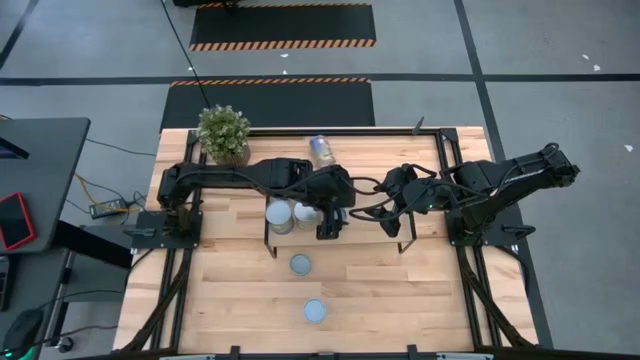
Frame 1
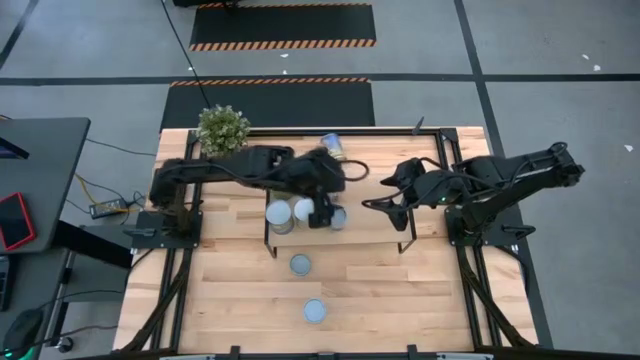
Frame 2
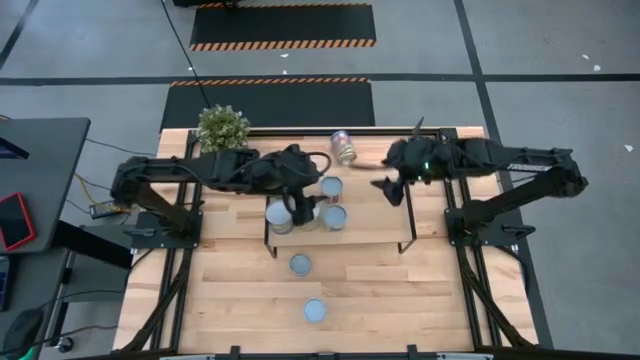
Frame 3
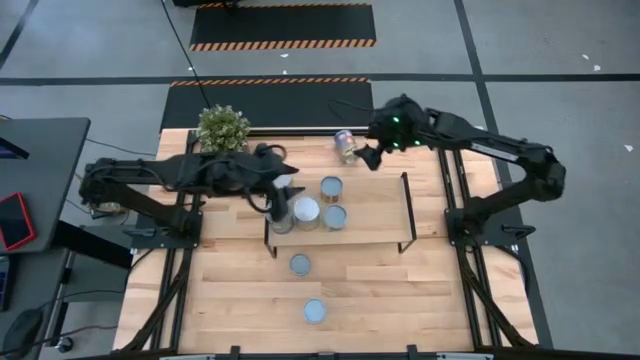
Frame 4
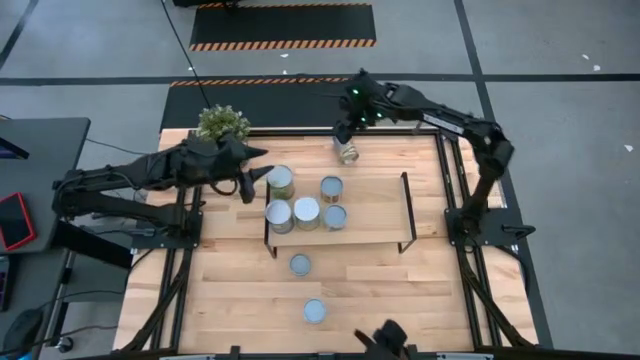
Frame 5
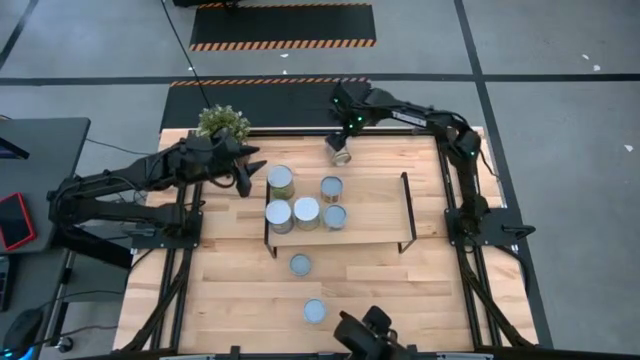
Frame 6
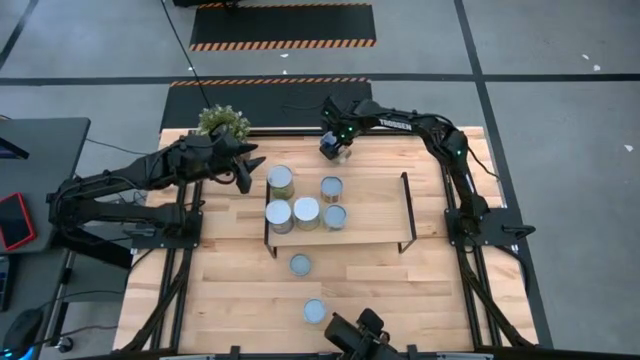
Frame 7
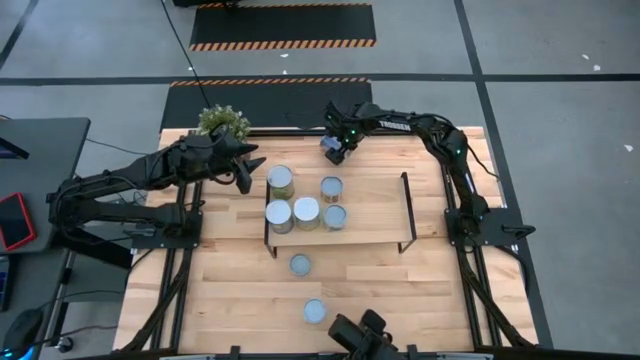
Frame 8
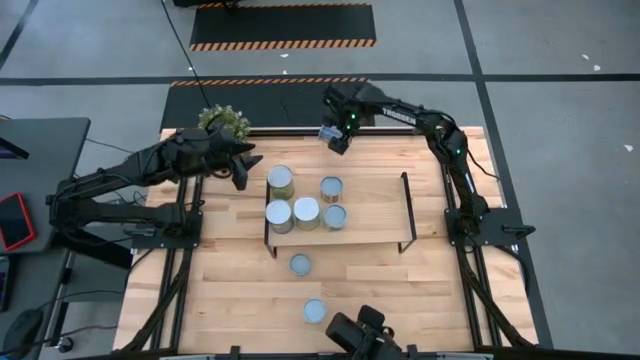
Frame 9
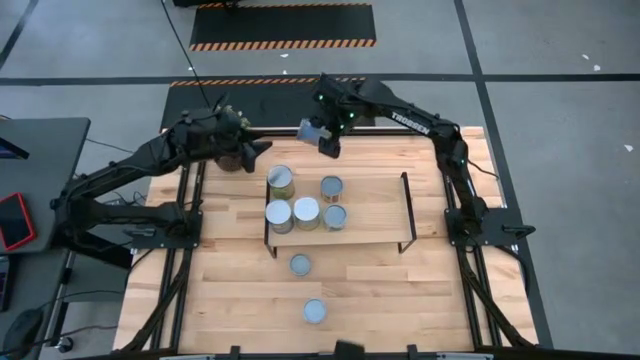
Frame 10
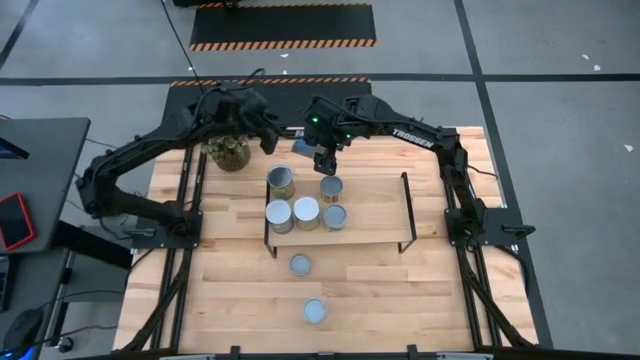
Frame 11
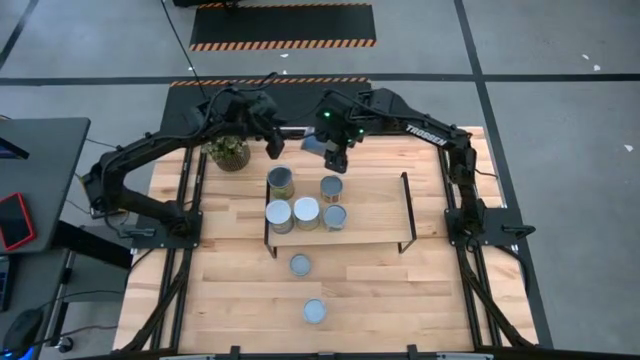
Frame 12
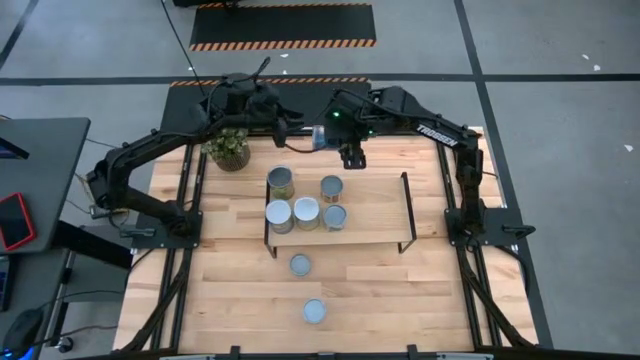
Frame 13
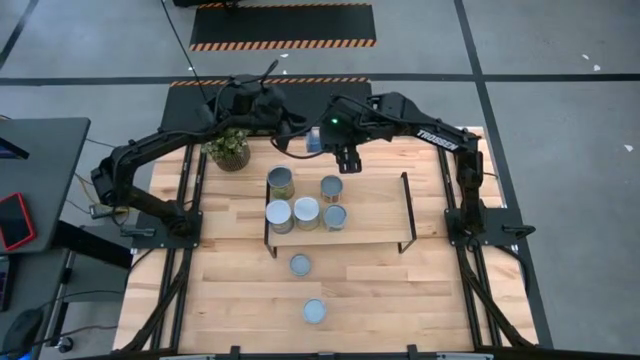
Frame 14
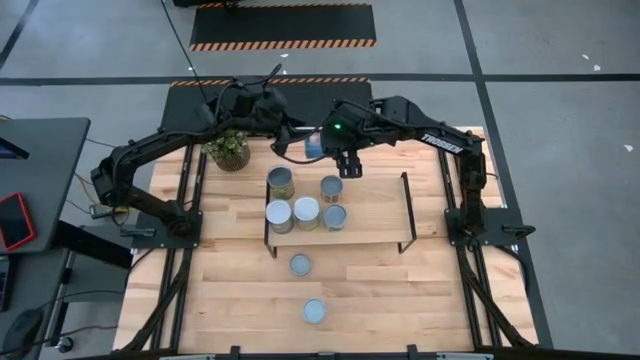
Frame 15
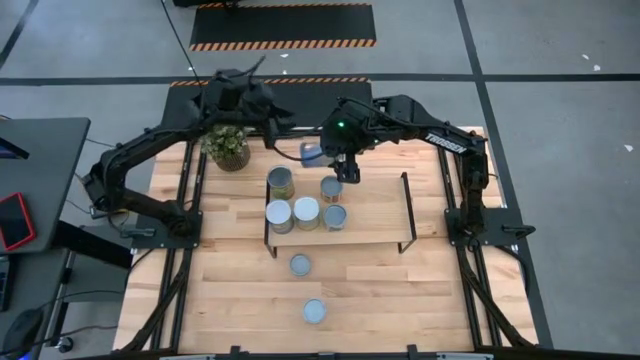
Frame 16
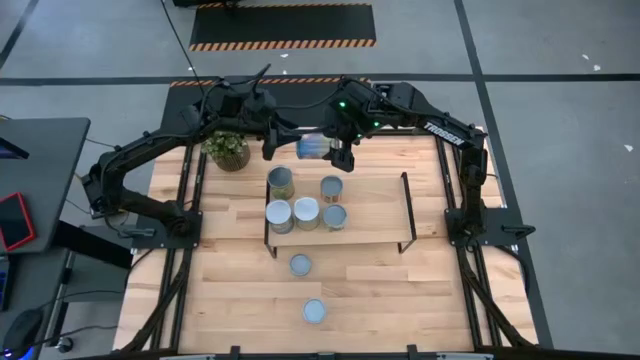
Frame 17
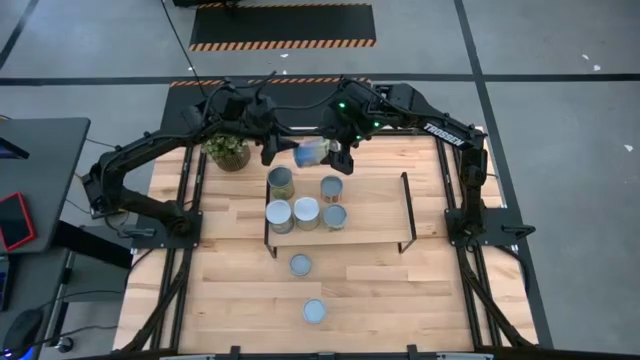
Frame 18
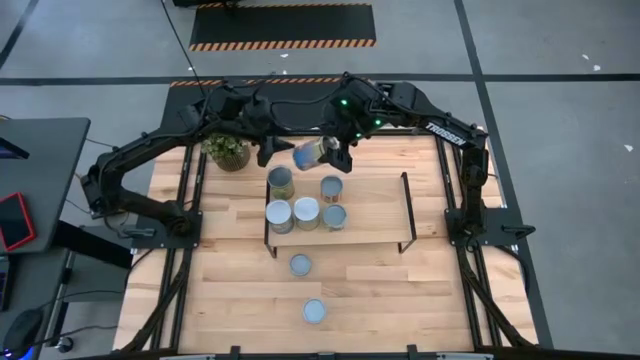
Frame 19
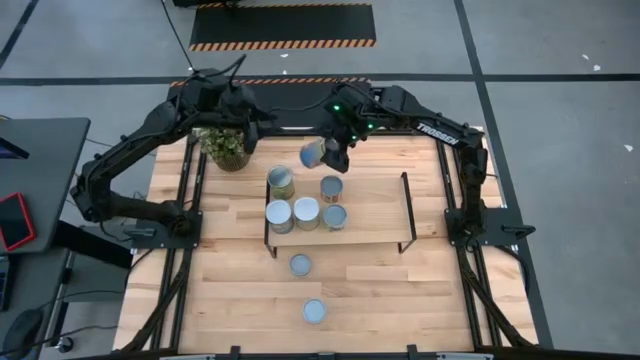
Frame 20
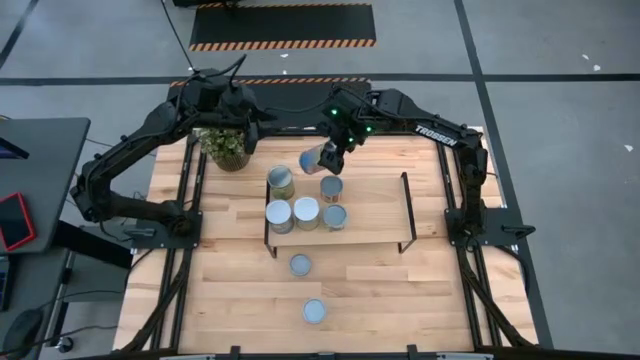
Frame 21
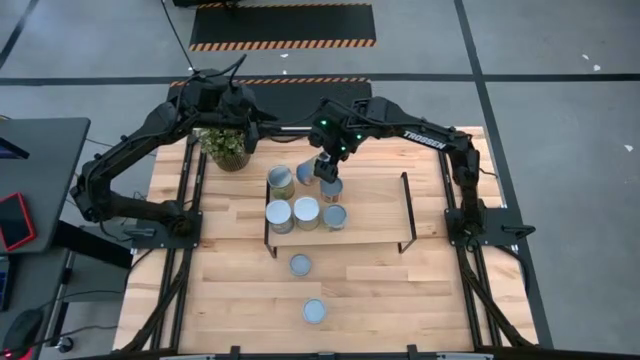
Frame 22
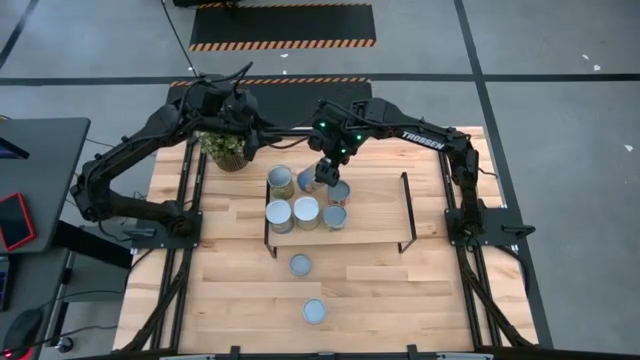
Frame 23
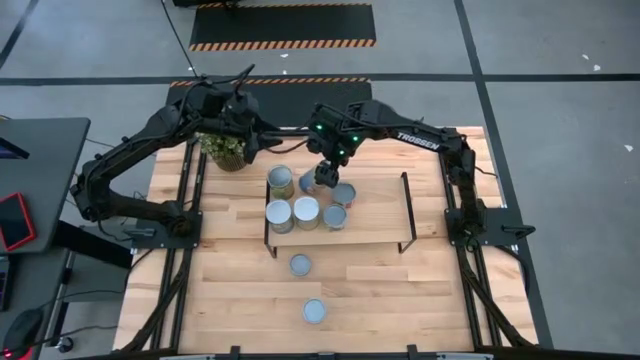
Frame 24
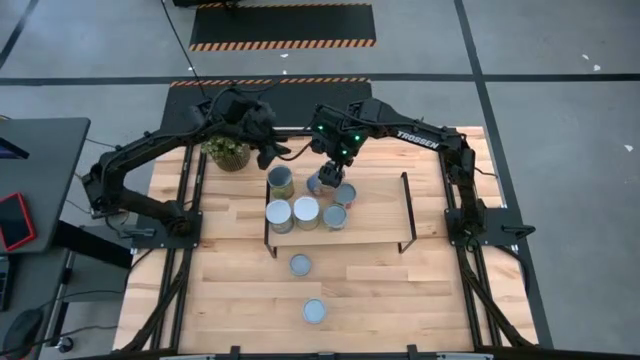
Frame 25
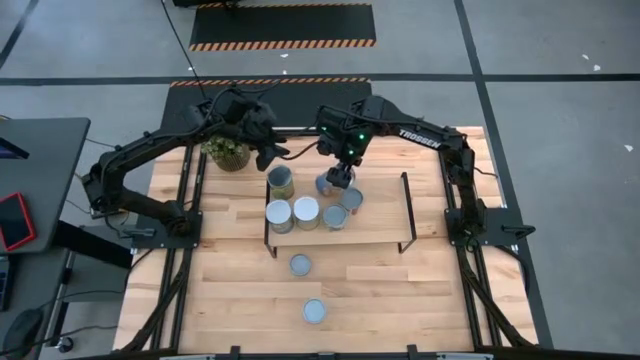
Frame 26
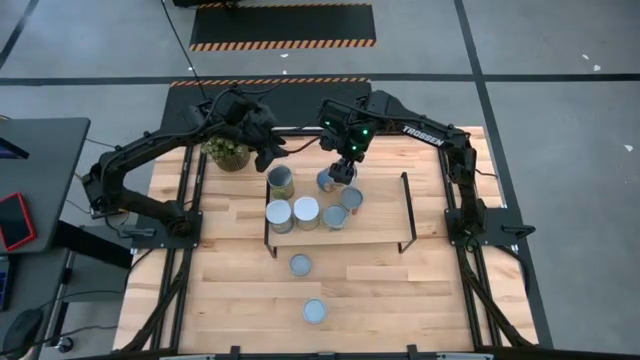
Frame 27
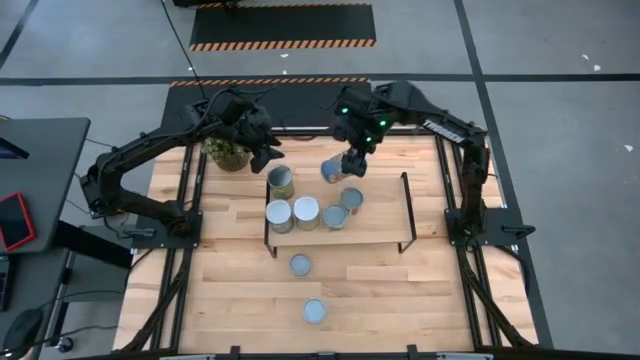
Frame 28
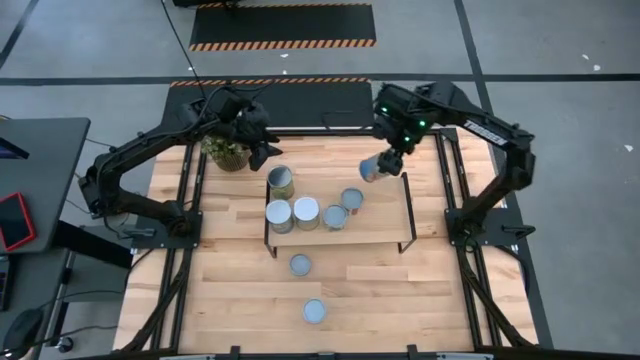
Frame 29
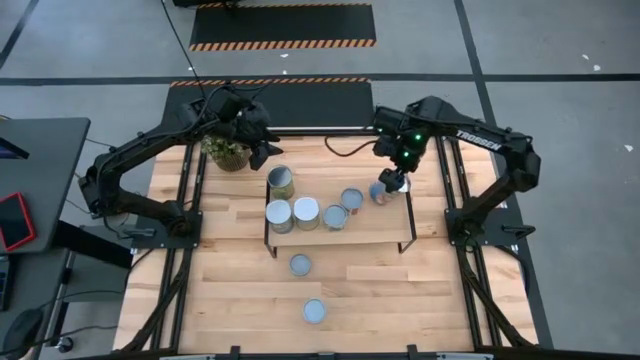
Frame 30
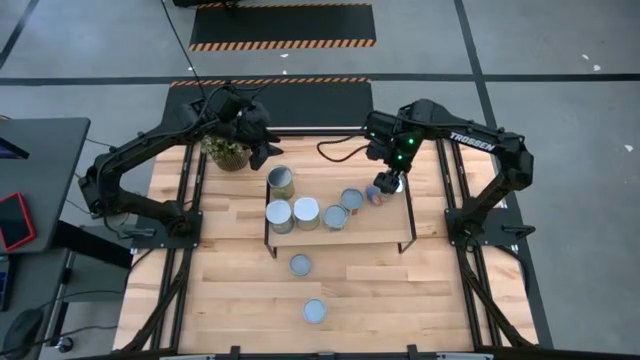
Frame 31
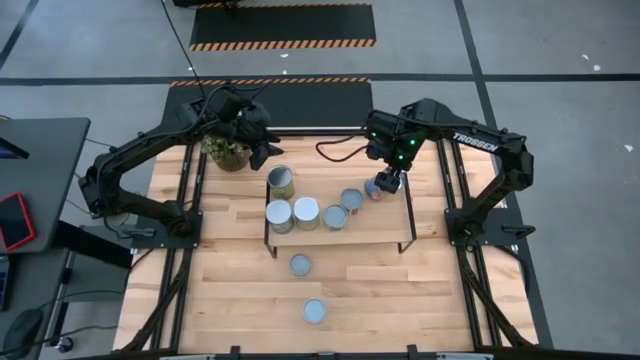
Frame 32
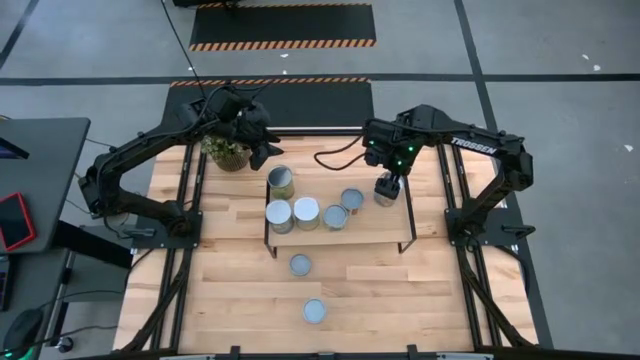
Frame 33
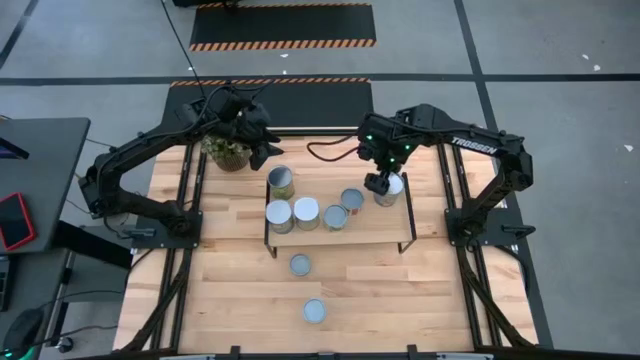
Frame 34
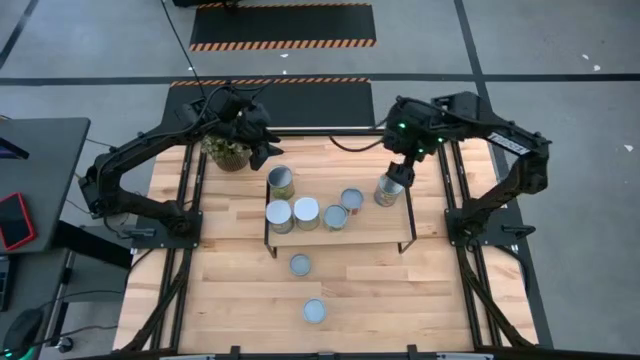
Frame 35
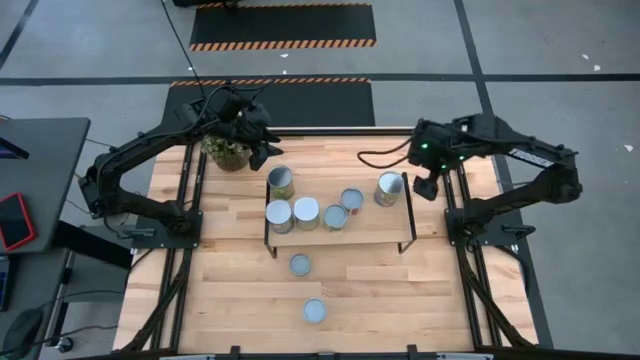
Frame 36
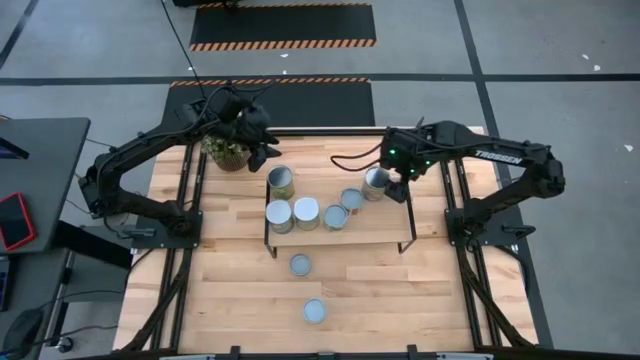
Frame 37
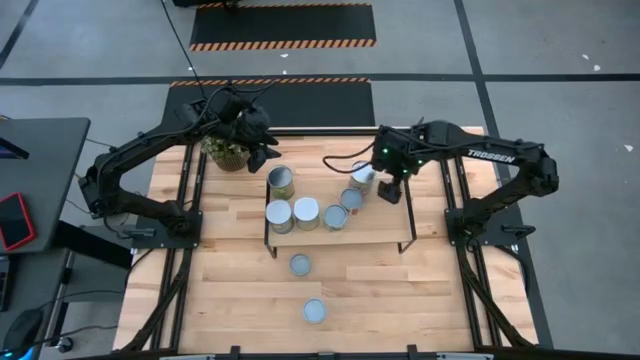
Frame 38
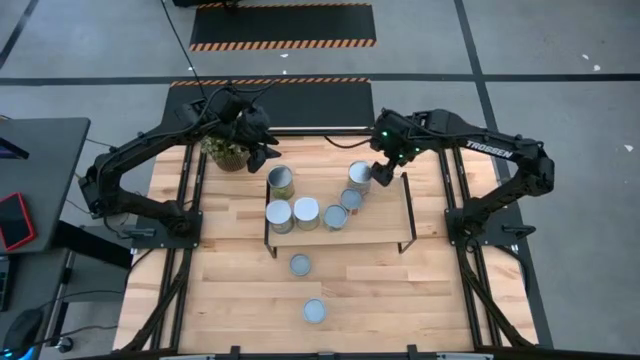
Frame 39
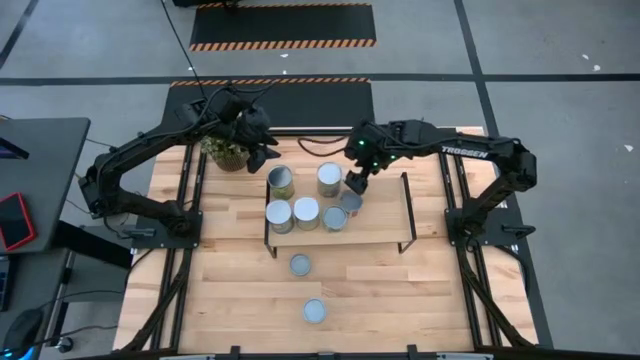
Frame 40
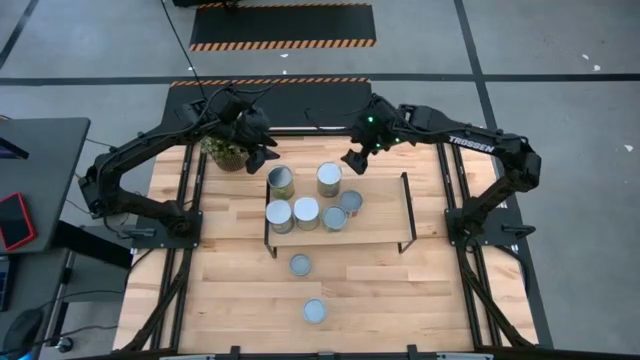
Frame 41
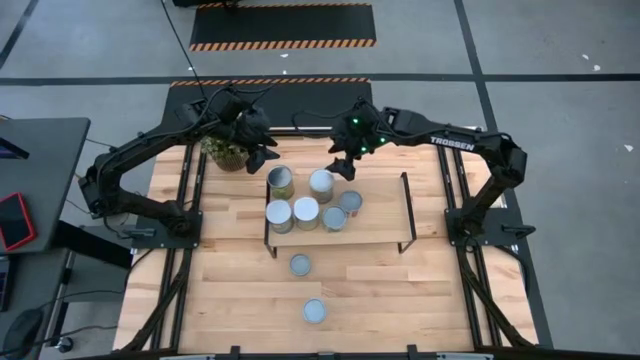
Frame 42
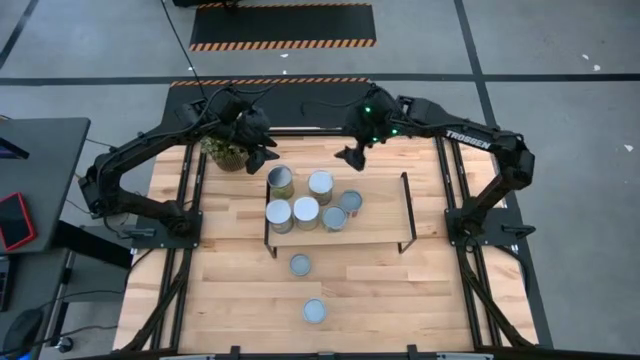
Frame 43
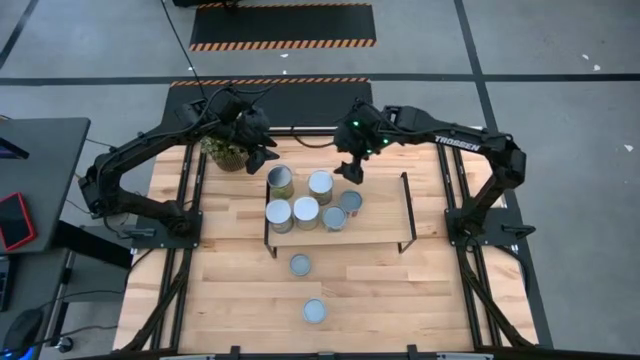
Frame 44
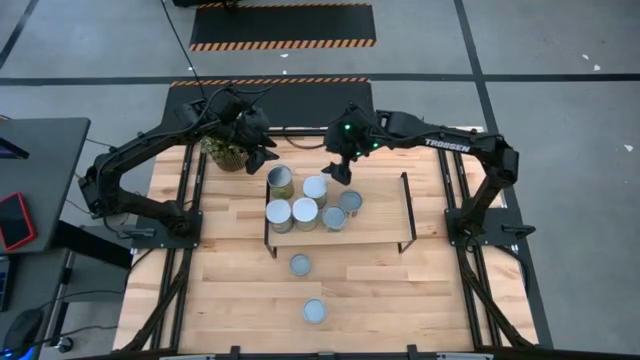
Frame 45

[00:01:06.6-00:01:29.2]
Task: Pick and place cans onto a shelf
Put the canned peaches on the shelf

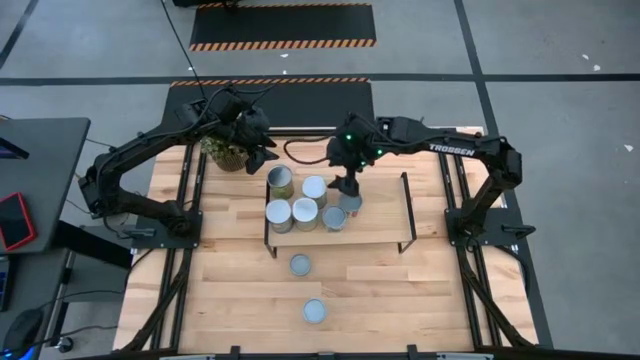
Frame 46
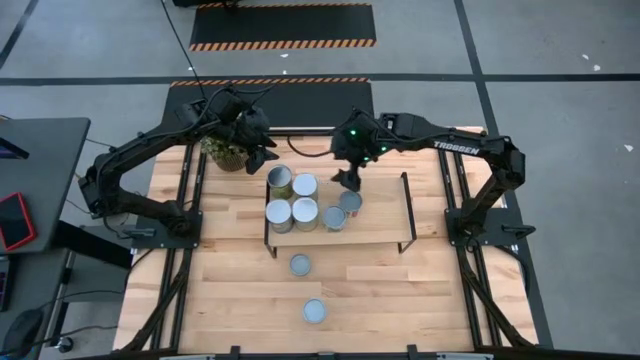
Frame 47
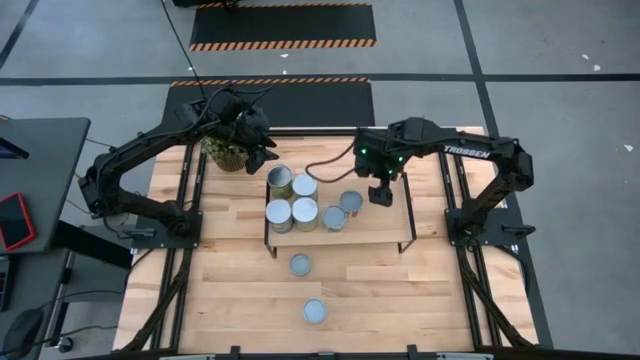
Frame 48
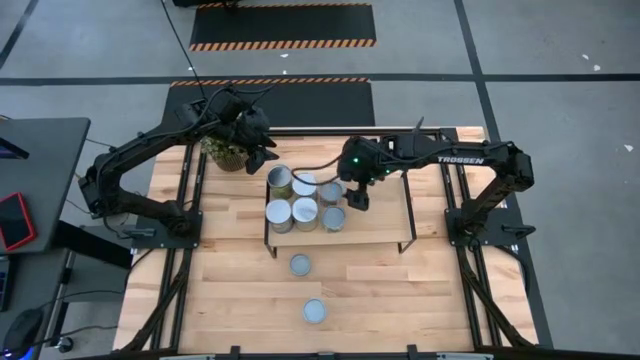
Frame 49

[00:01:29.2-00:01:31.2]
Adjust the canned goods on the shelf
